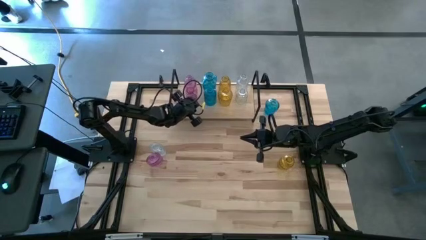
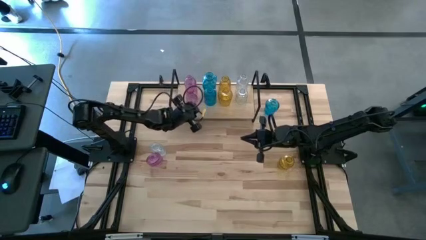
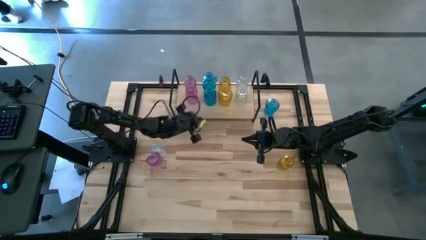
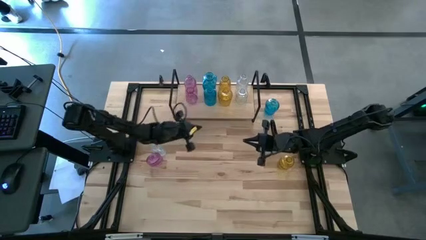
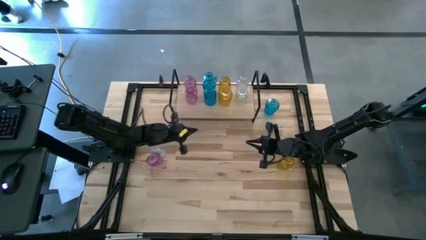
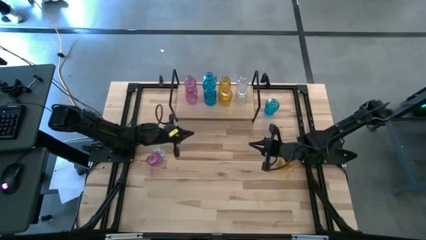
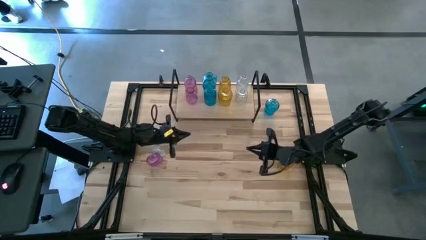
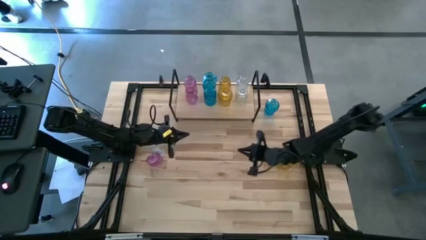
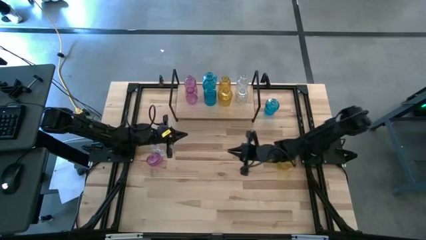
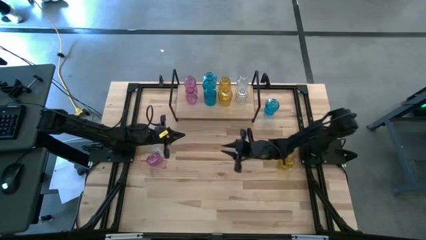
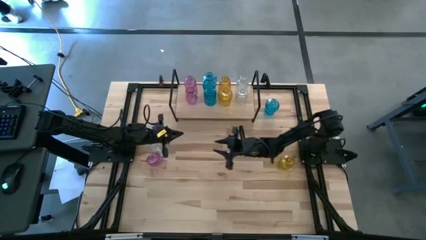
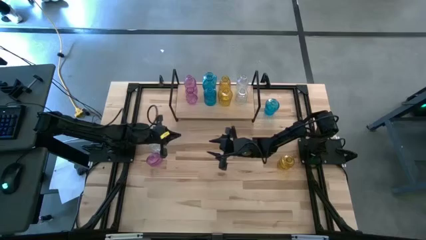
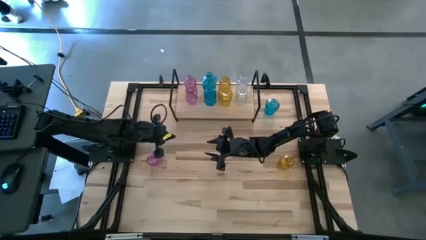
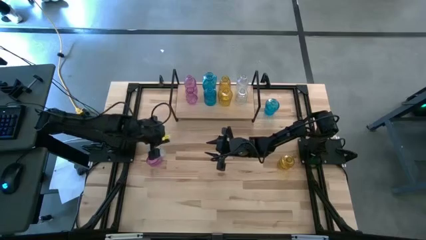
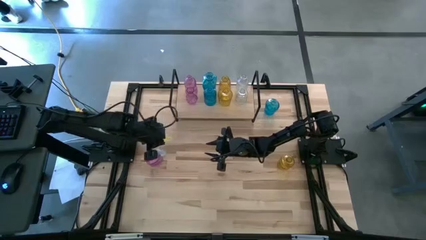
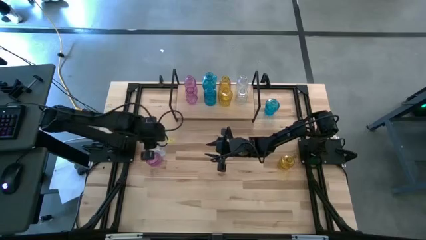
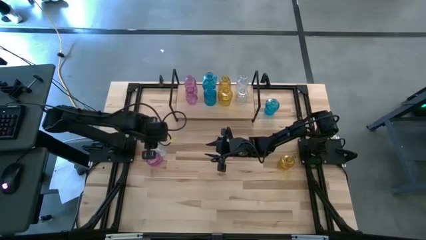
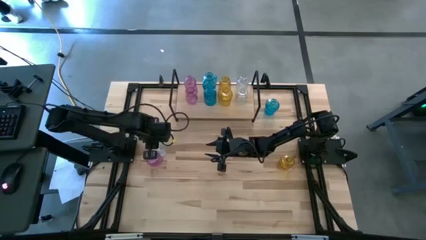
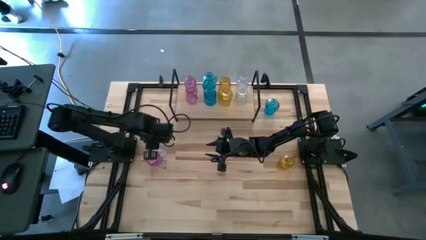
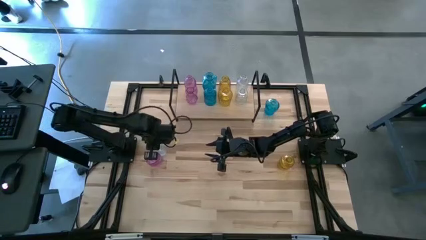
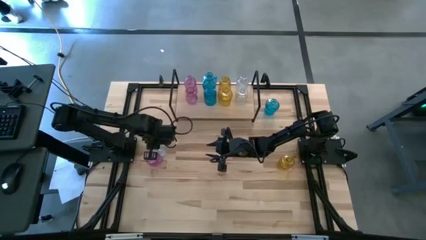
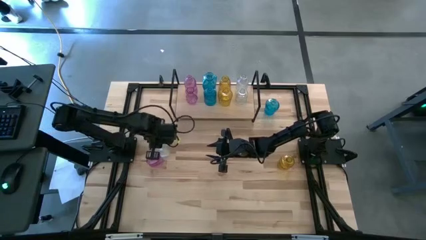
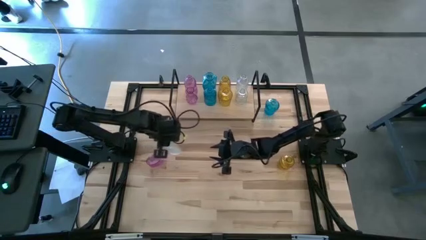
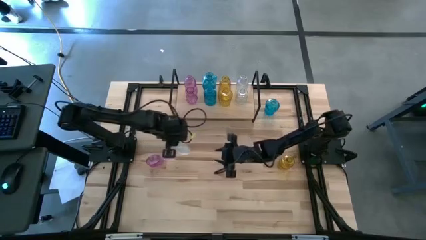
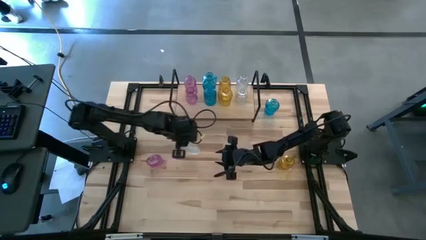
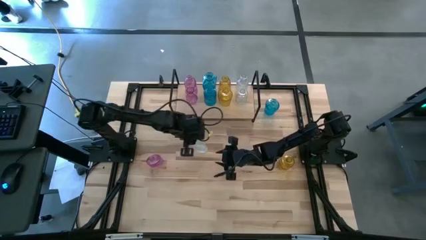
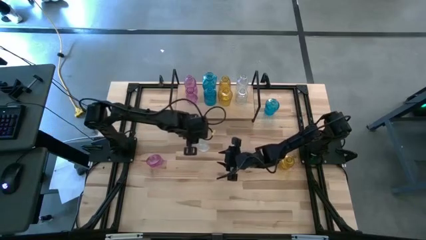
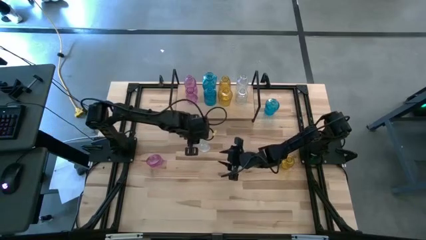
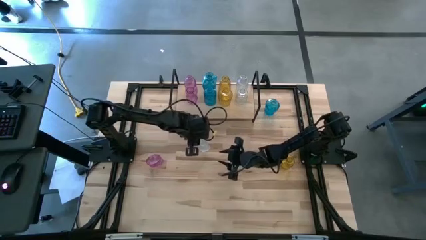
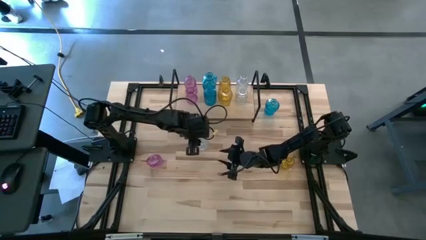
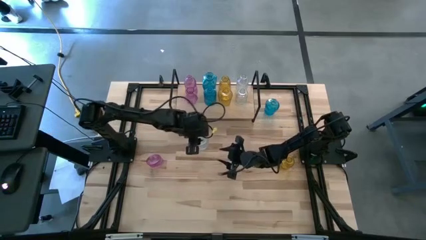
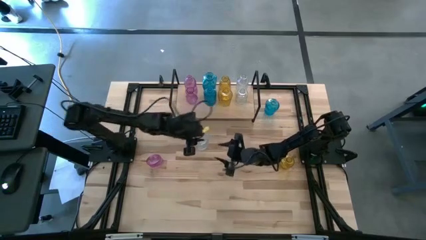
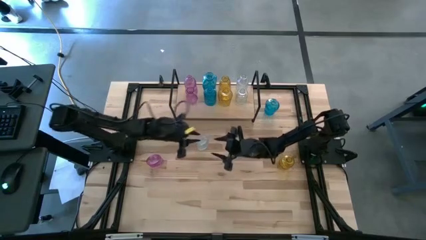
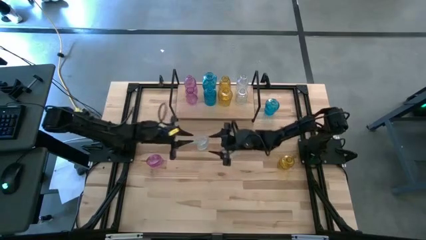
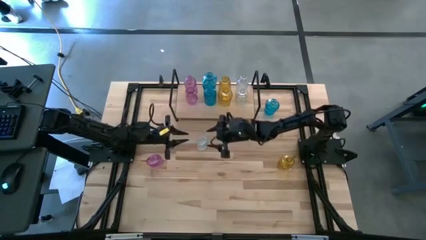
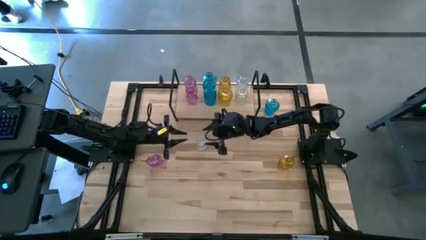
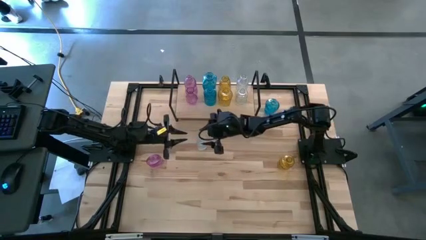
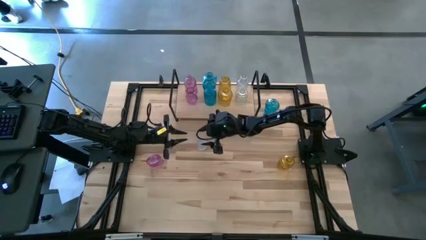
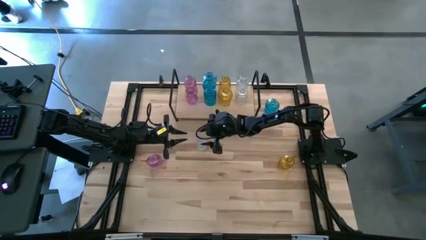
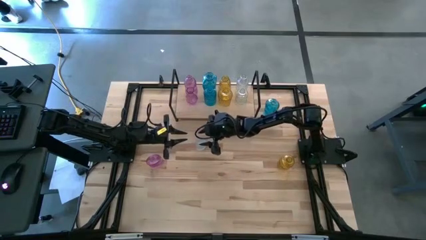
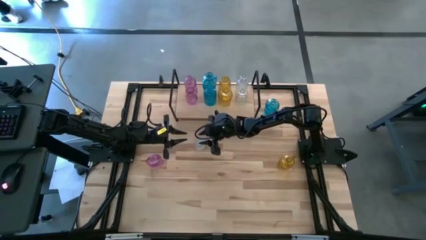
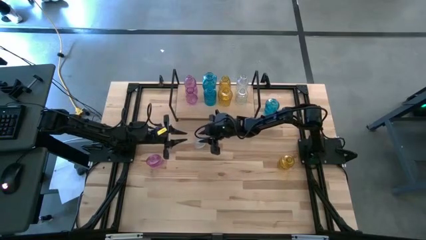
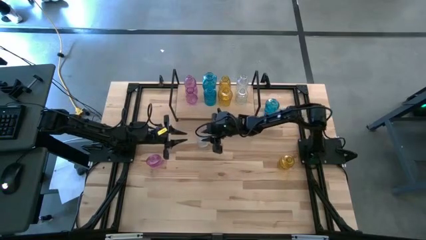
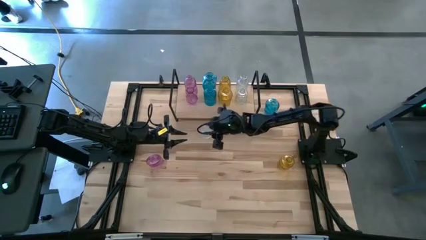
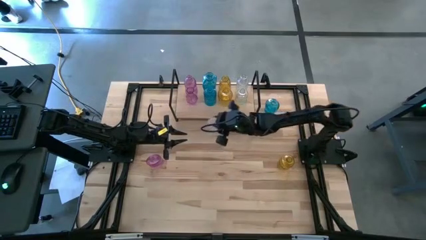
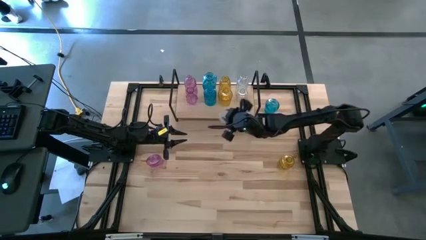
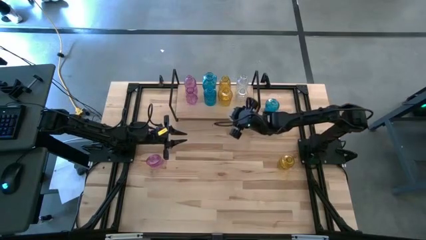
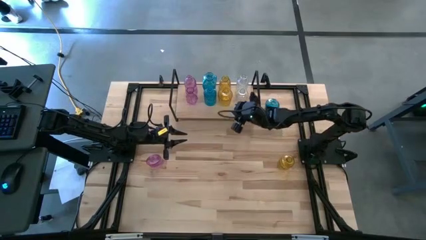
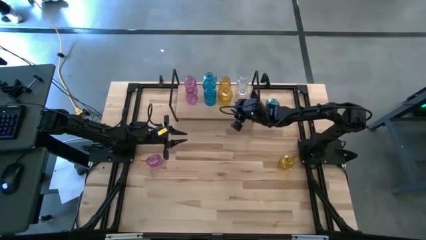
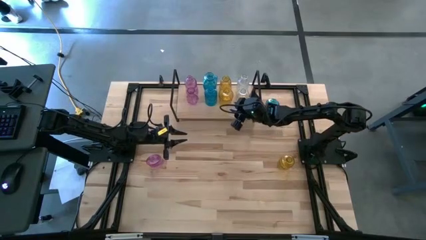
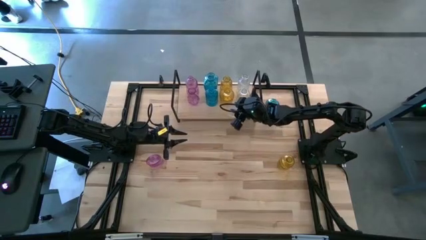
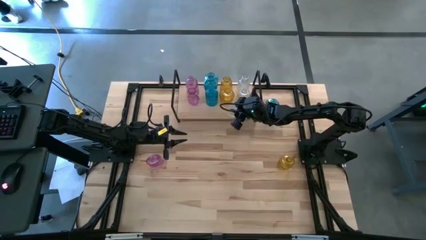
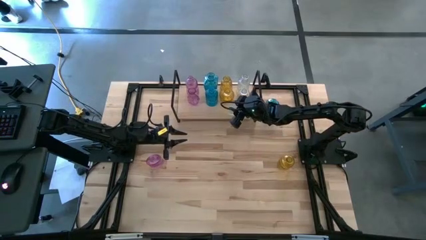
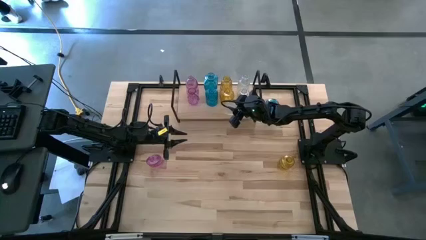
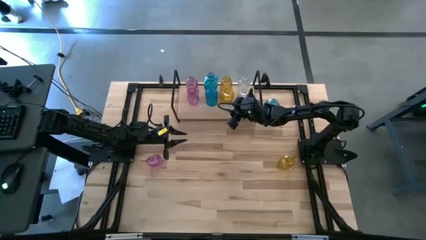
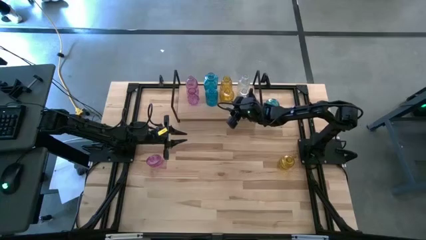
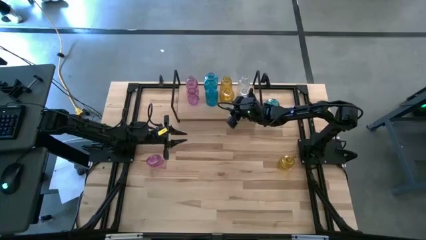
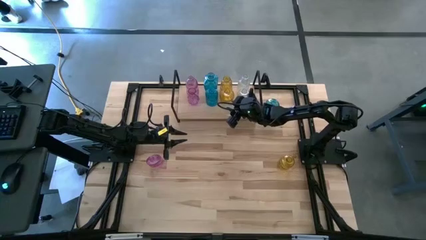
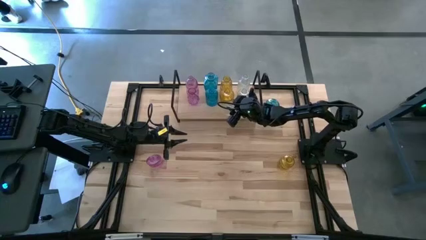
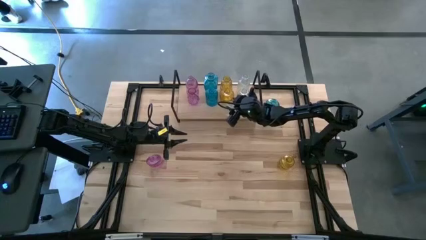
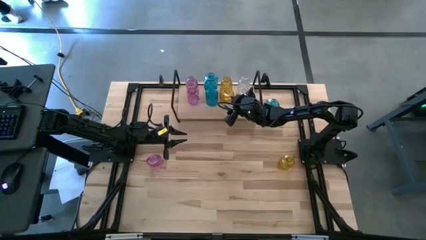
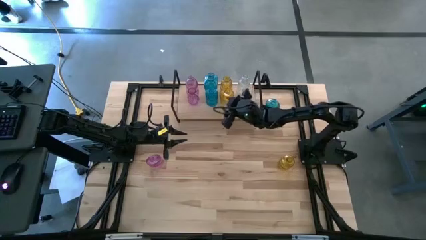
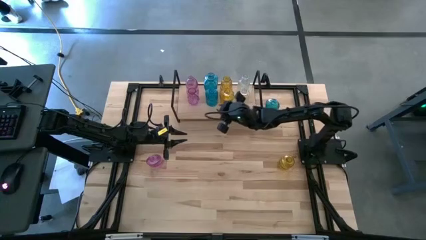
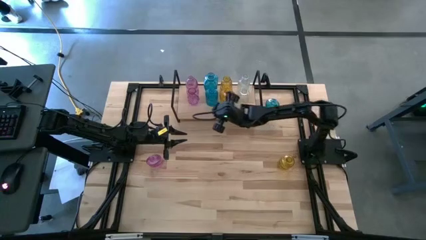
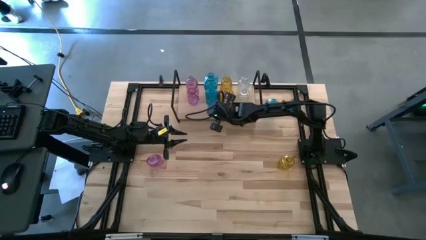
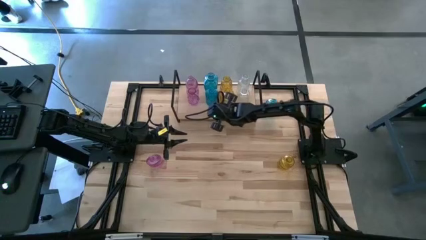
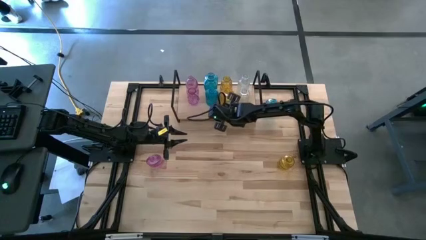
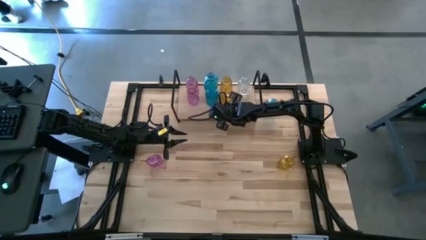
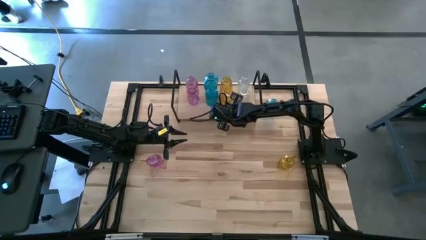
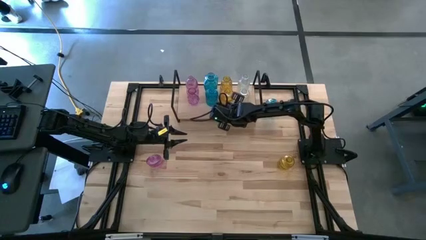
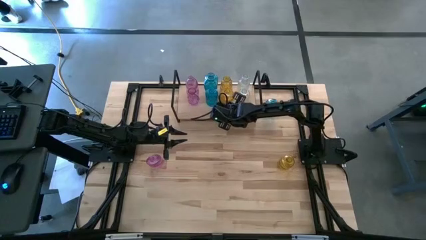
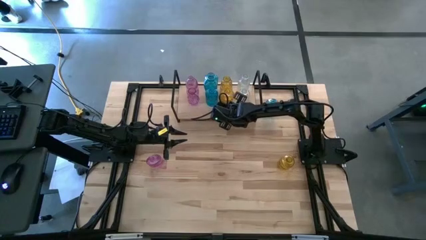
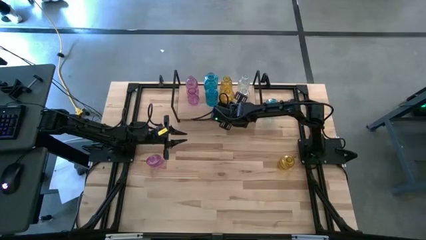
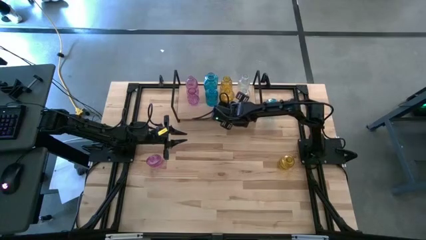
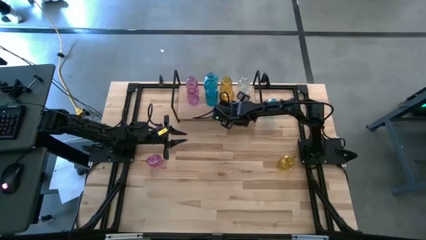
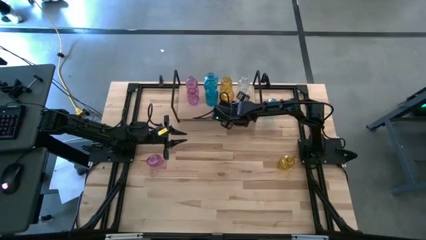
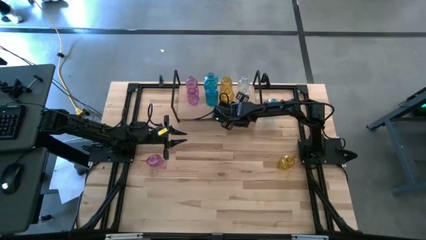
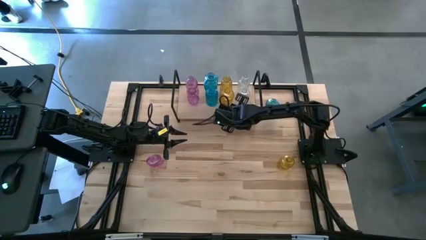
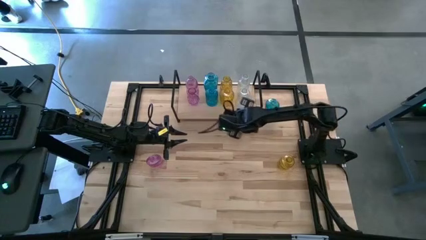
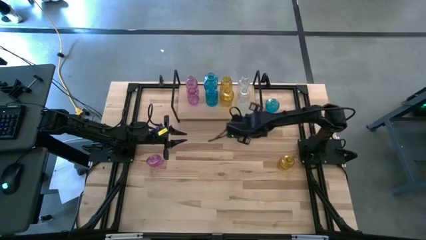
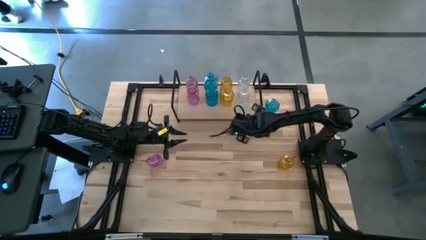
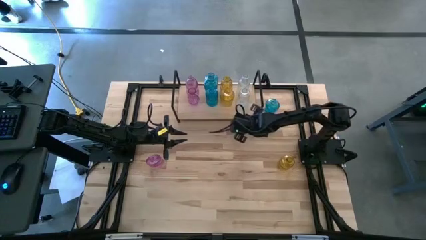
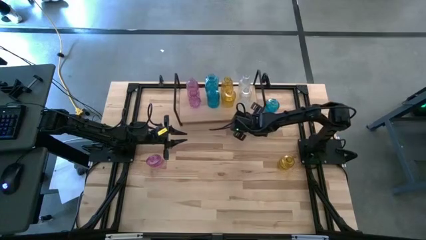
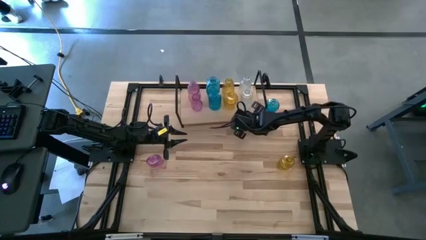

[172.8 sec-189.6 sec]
Task: sort vases onto shelf
Put the transparent vase on the shelf aligned with the other transparent vase

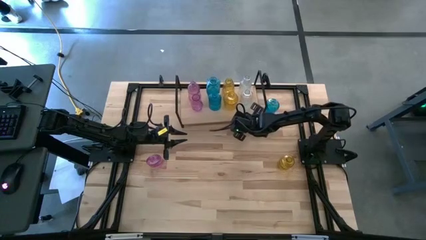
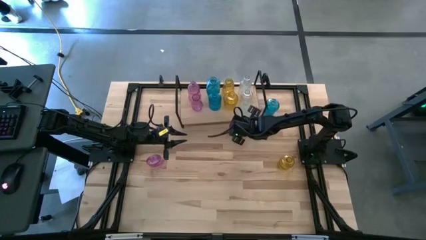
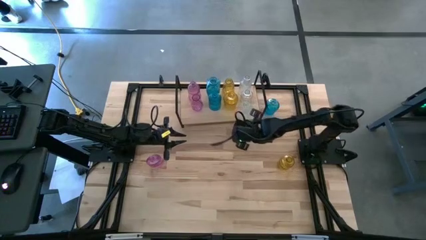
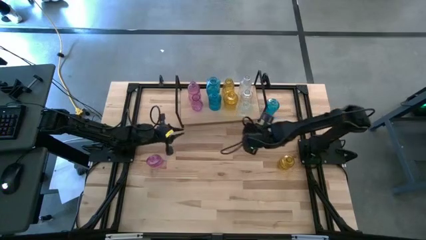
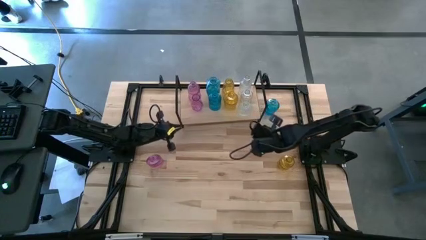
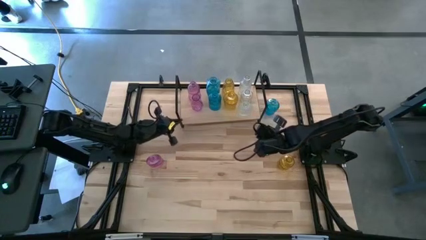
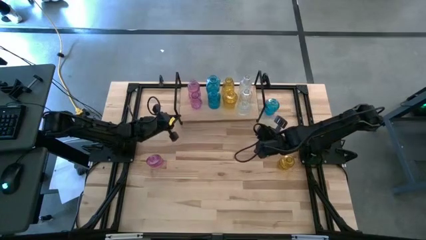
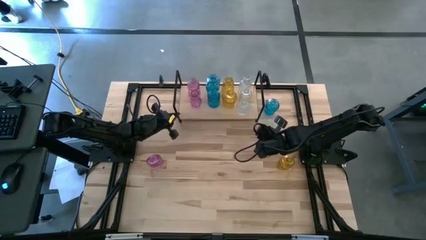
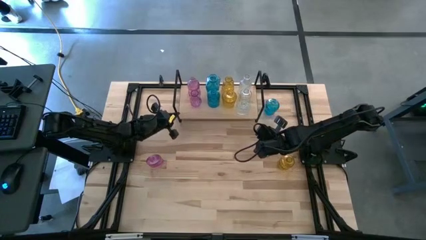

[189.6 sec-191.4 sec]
Adjust the shelf
